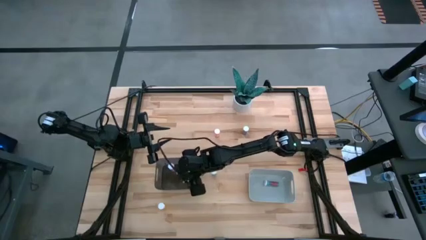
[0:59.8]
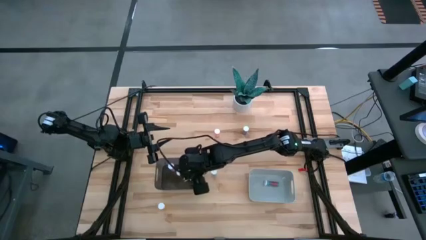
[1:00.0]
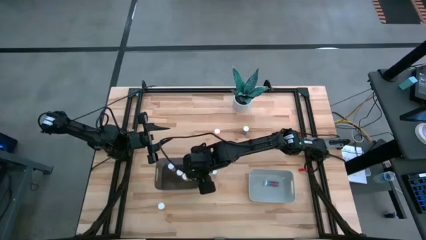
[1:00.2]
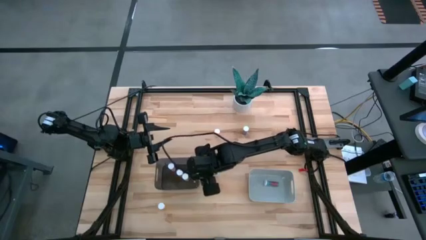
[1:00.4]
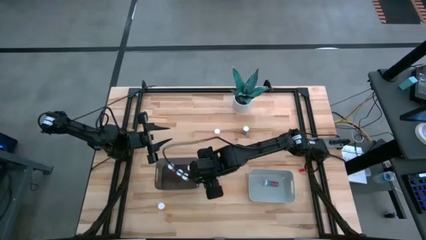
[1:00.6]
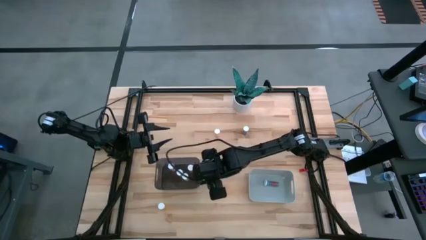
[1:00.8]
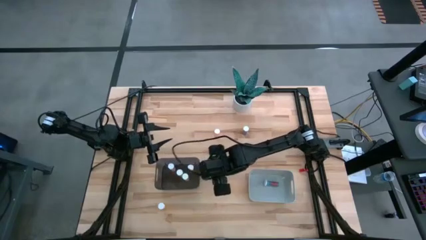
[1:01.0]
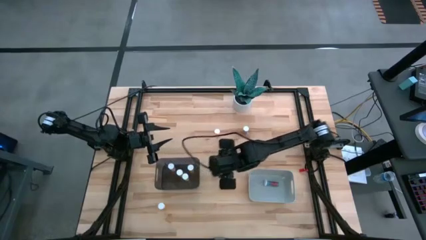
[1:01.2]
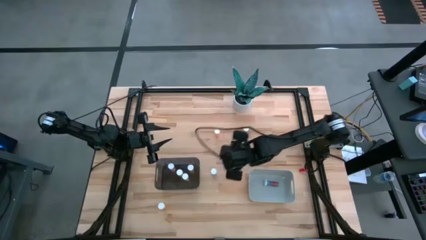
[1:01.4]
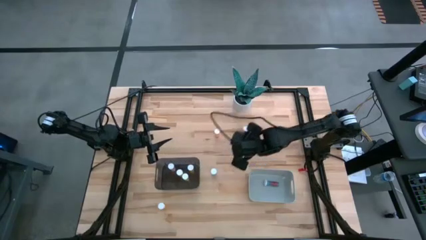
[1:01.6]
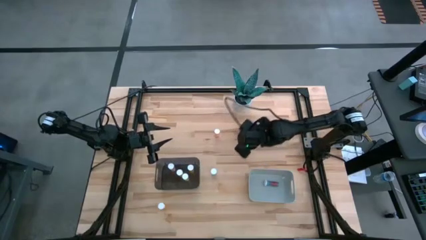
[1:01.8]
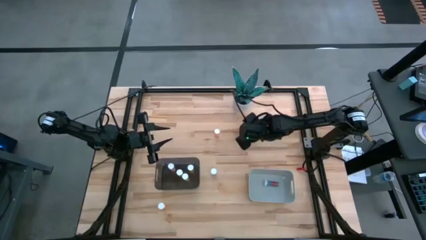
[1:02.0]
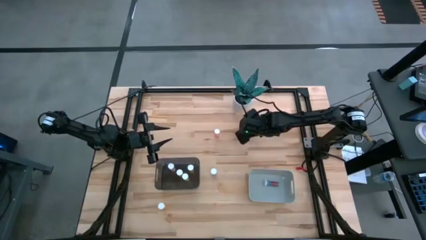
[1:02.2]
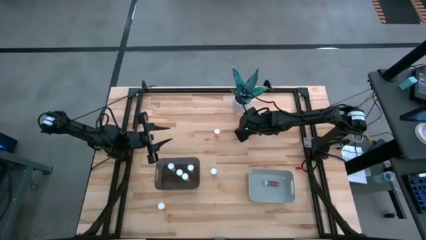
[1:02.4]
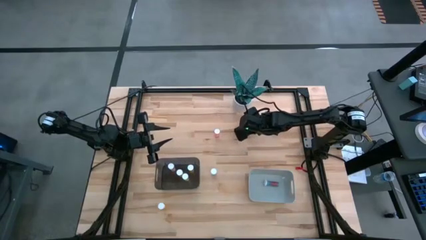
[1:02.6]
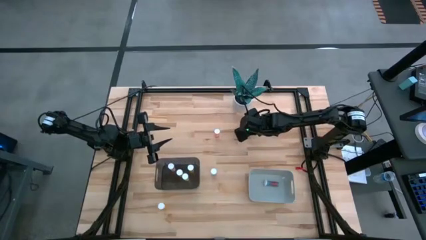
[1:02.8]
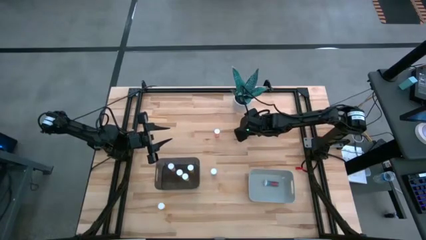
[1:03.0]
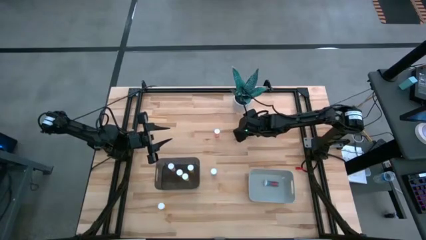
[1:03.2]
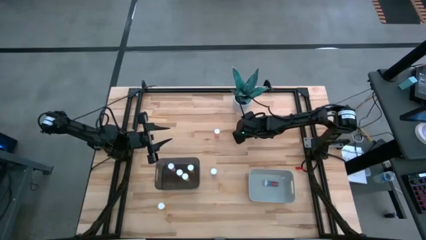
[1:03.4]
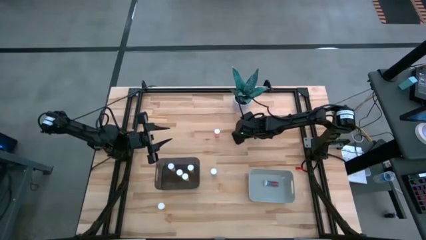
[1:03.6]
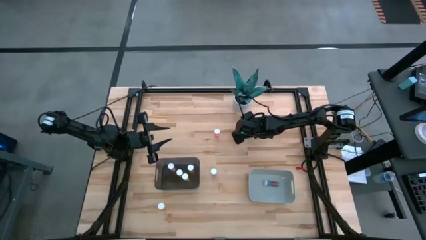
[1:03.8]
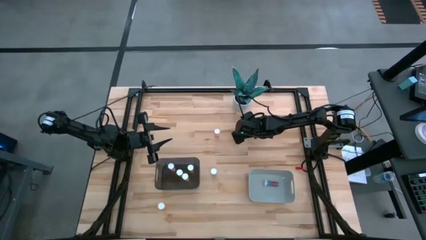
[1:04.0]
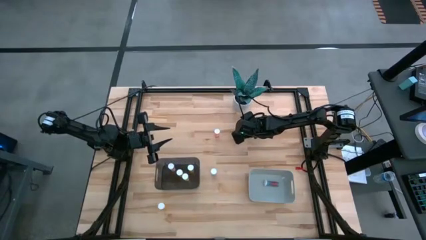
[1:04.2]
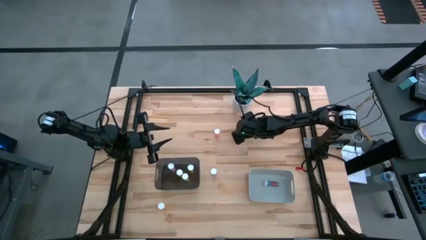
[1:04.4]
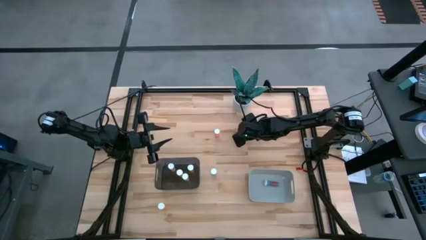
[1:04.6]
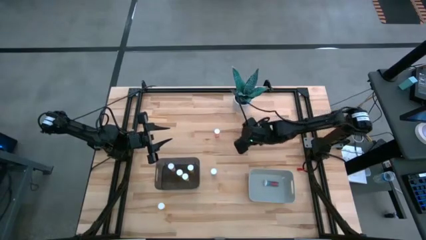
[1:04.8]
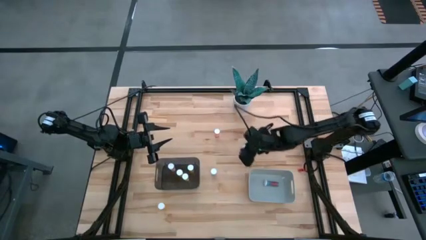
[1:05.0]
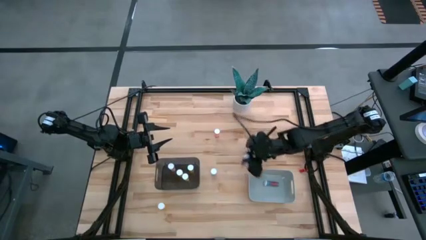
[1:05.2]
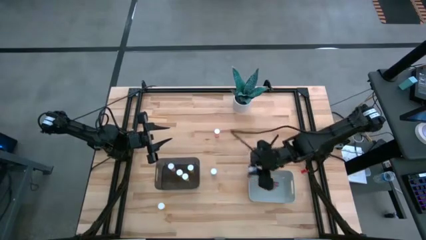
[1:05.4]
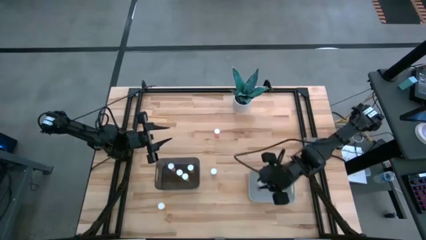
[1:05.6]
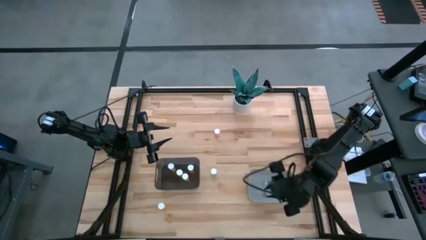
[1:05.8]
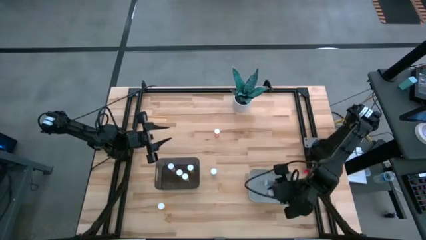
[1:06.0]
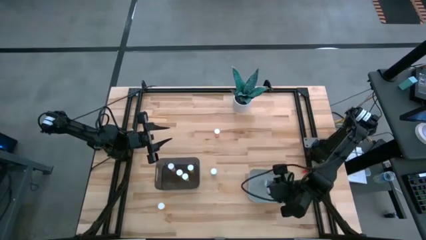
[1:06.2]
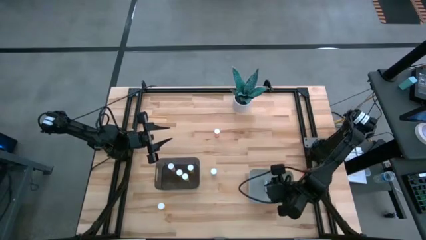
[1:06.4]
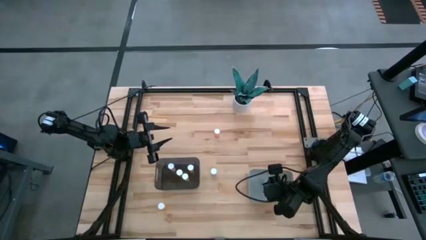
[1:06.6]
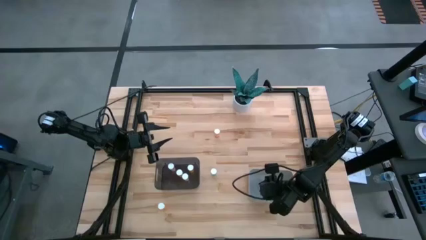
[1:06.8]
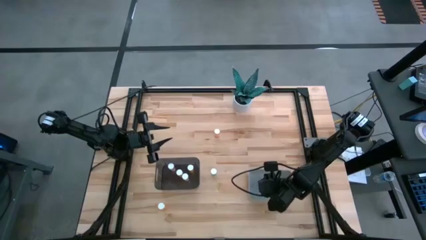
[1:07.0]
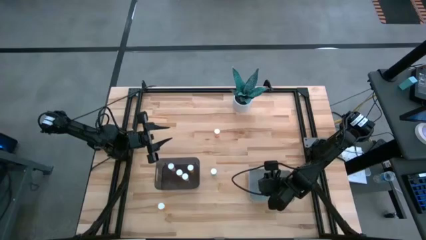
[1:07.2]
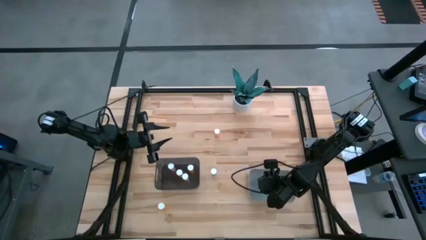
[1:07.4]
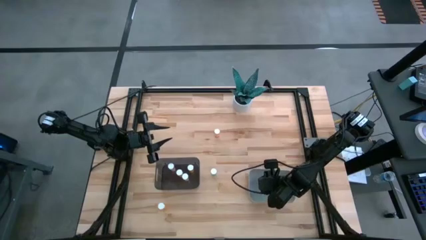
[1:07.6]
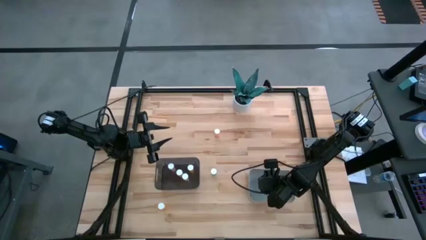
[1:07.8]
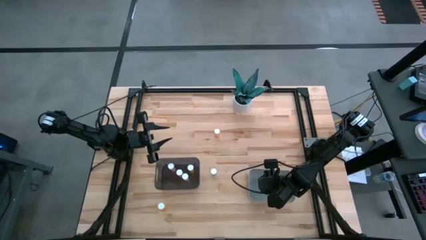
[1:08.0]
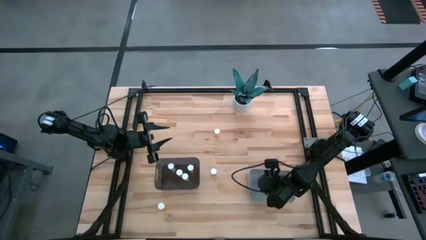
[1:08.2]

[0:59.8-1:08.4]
Task: Pick and place medicine bottles into bin by pill shape (circle, oval)
Put the top blue capsule bottle into the gray bin
